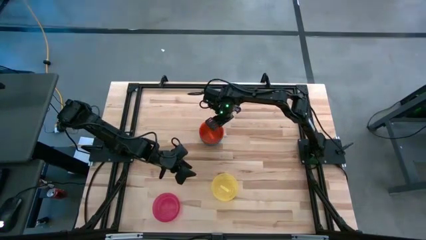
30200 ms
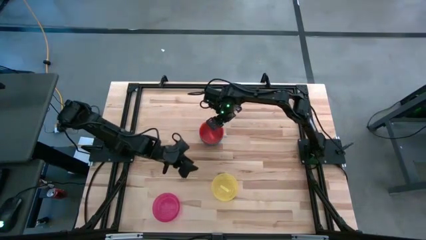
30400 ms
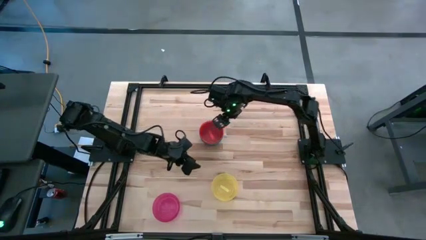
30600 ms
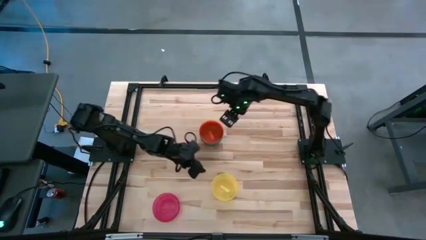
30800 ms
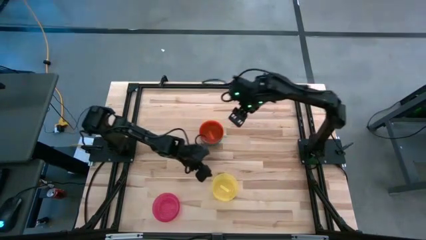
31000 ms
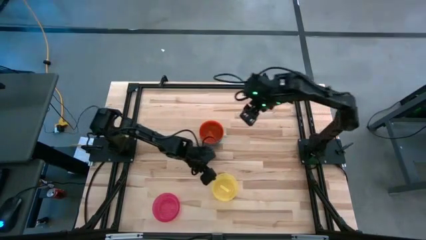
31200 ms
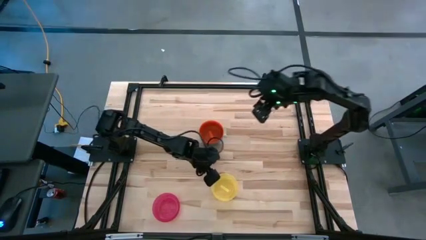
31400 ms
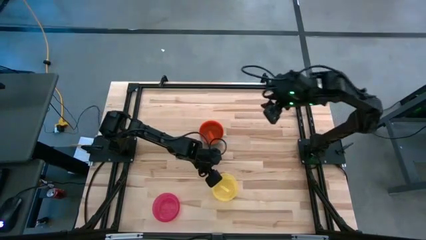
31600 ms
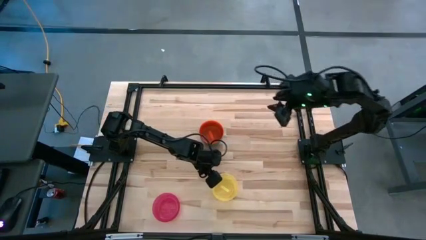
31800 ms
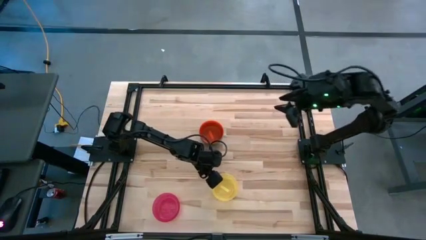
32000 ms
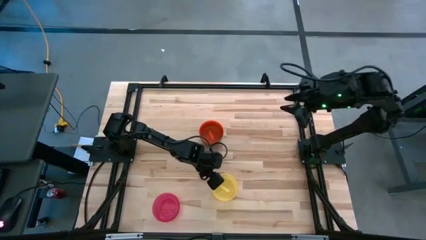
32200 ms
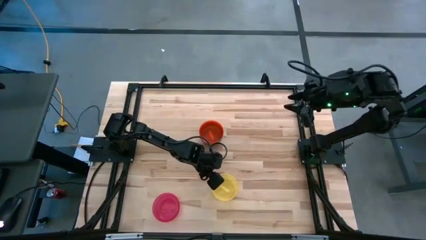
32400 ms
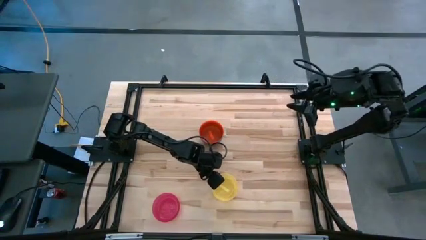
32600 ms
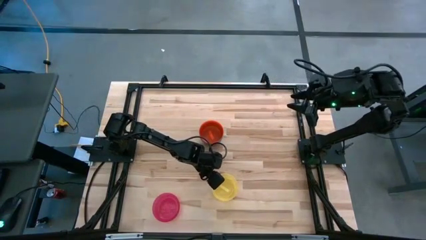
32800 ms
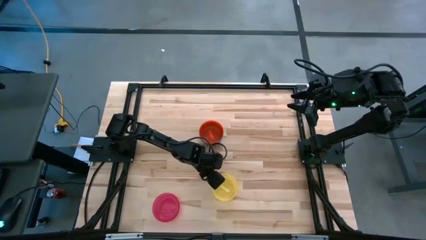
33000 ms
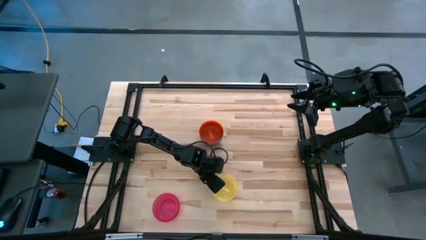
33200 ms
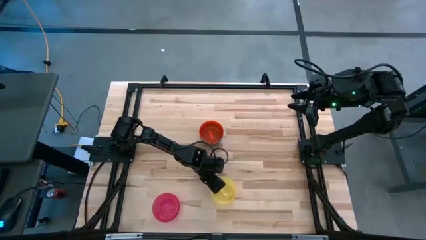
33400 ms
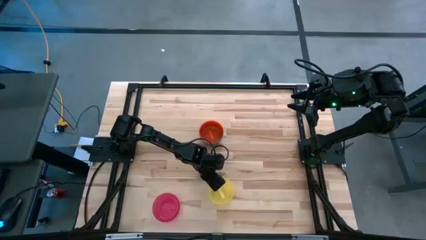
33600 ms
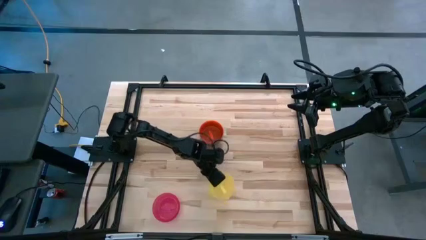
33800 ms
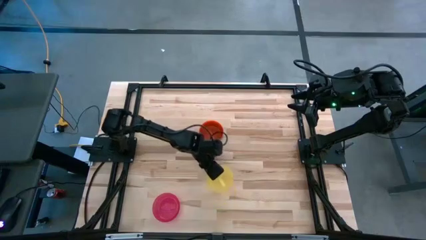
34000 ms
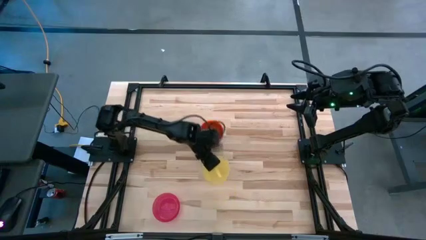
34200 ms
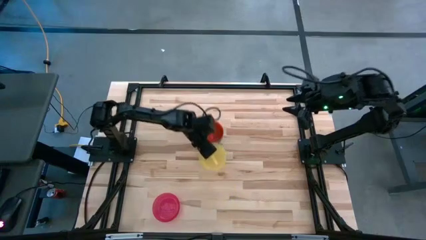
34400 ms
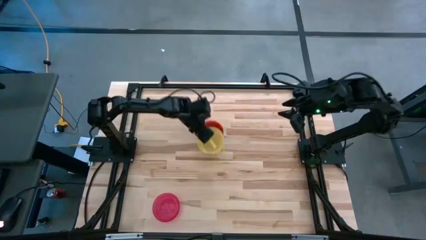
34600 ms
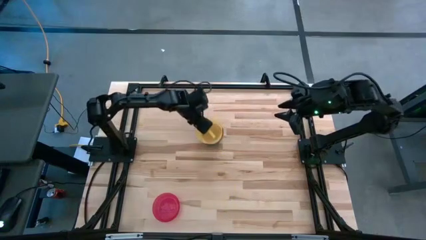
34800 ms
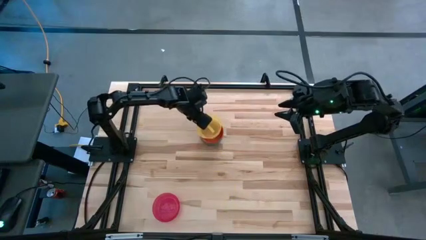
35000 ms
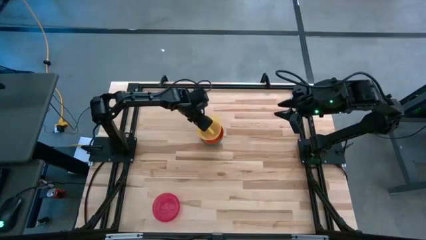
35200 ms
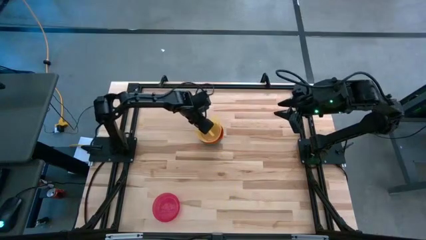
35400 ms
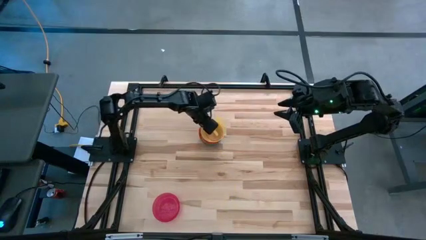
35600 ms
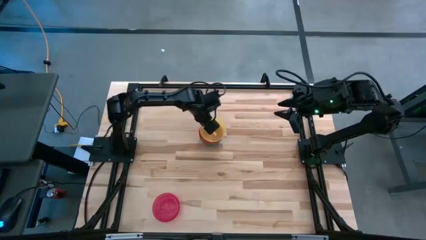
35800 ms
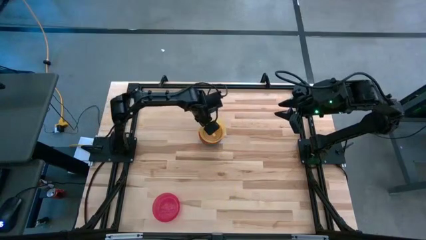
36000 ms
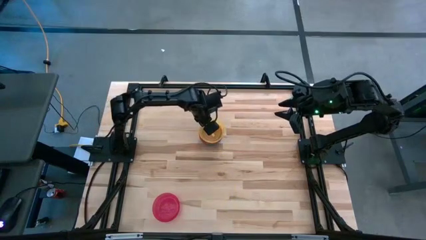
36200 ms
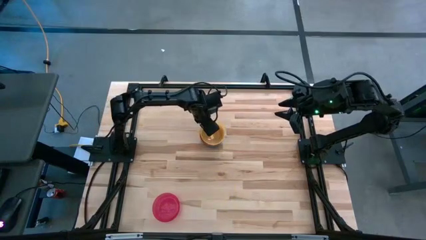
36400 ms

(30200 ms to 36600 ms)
Task: Nest bowls inside each other
Stack the yellow bowl on the orange bowl

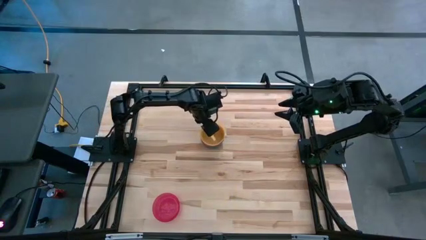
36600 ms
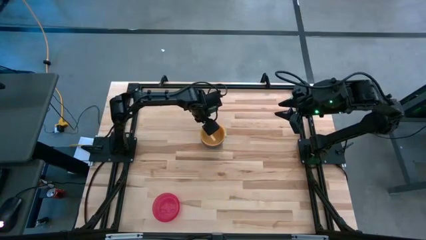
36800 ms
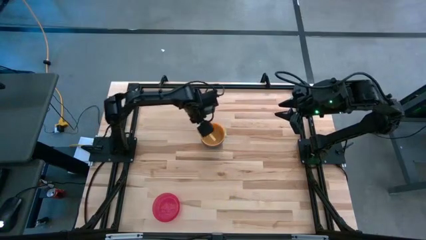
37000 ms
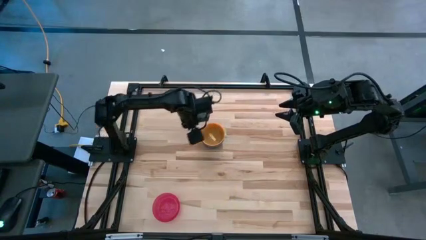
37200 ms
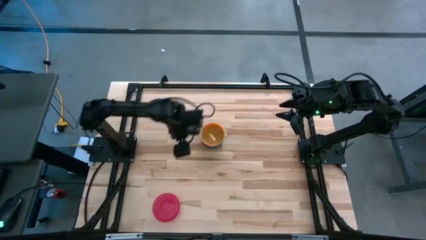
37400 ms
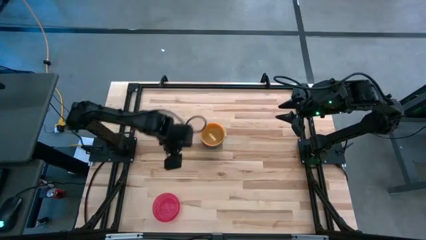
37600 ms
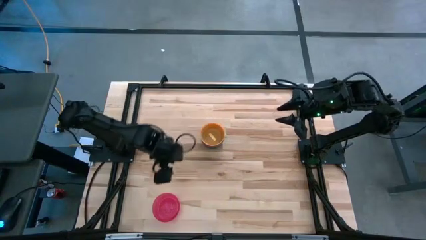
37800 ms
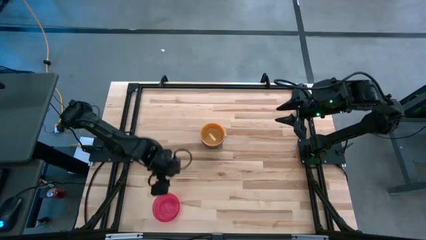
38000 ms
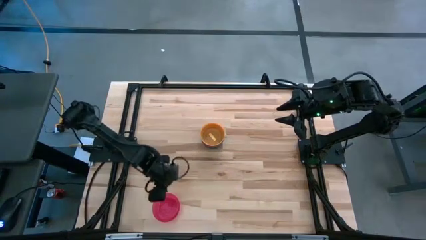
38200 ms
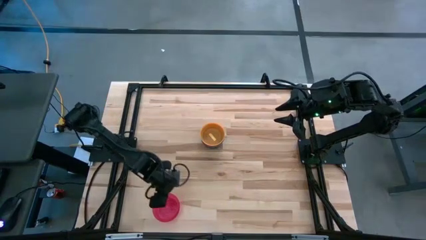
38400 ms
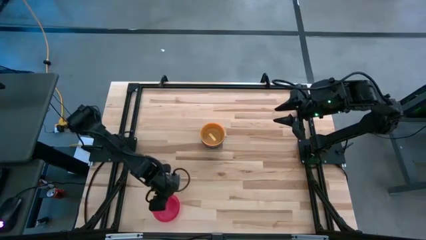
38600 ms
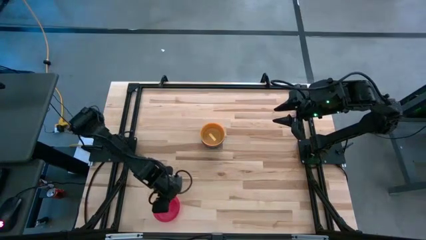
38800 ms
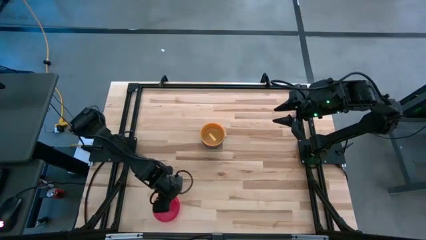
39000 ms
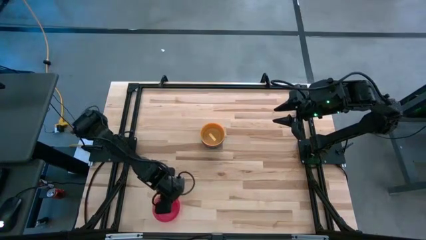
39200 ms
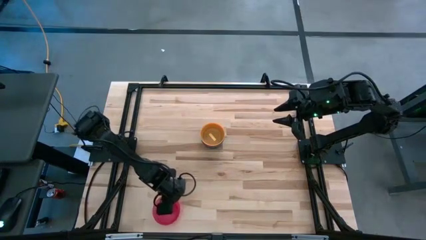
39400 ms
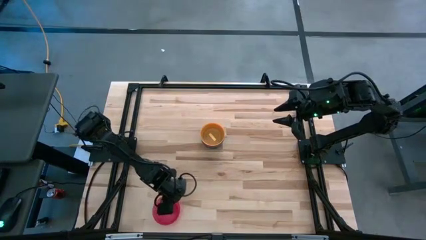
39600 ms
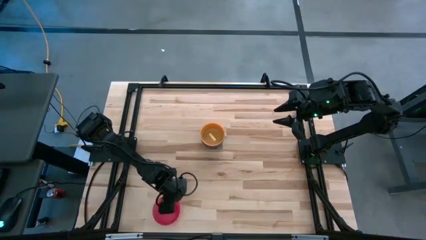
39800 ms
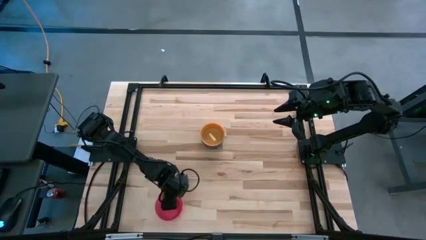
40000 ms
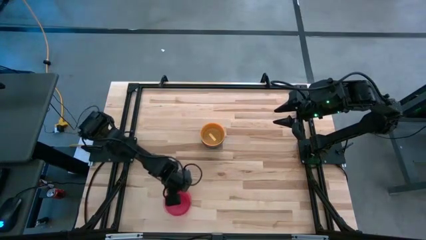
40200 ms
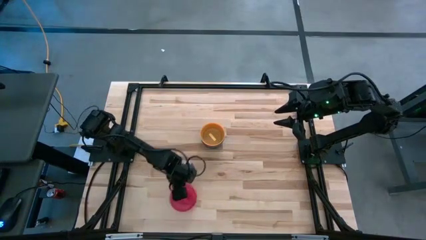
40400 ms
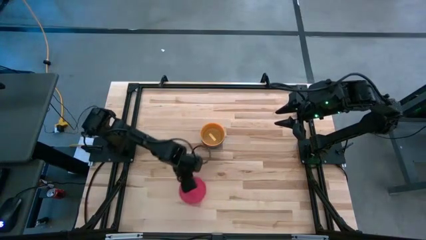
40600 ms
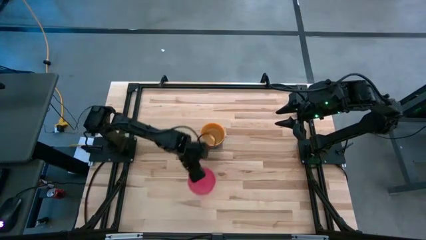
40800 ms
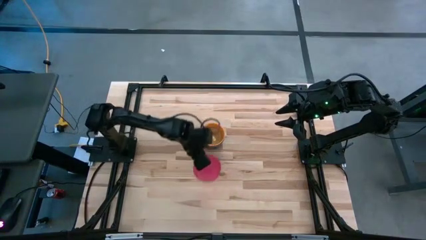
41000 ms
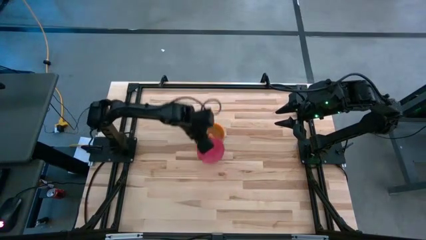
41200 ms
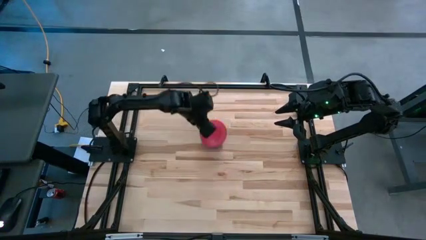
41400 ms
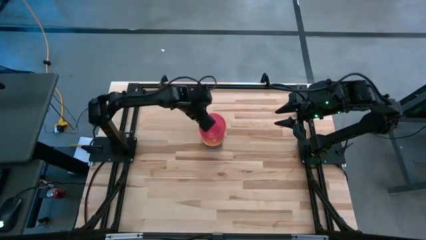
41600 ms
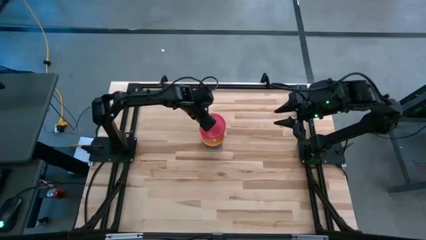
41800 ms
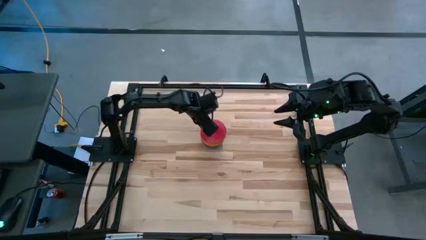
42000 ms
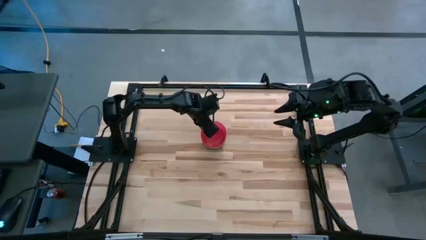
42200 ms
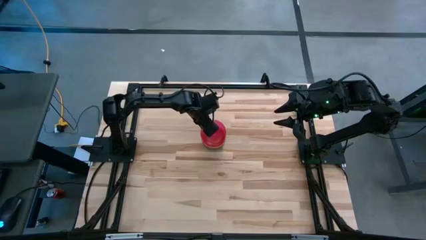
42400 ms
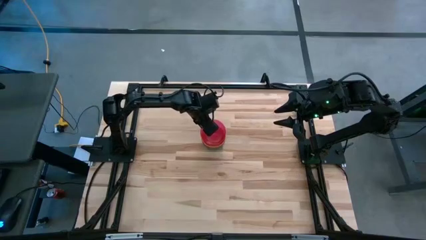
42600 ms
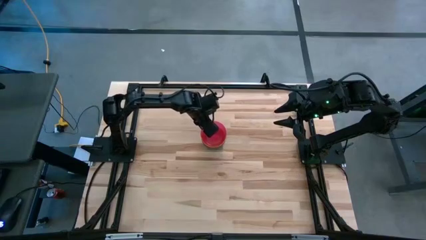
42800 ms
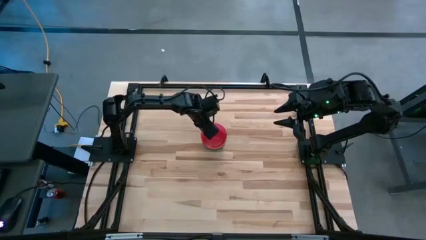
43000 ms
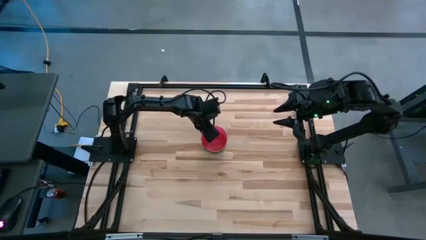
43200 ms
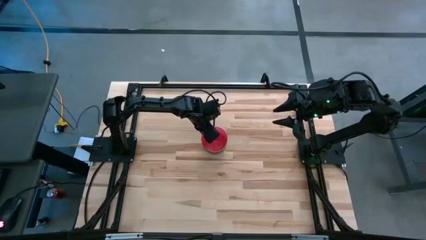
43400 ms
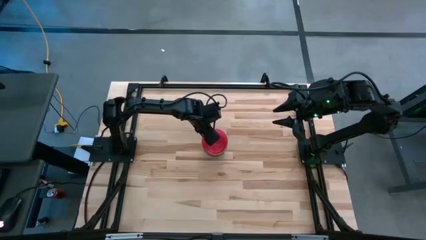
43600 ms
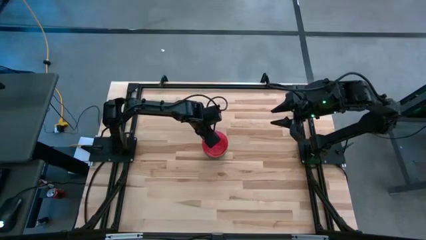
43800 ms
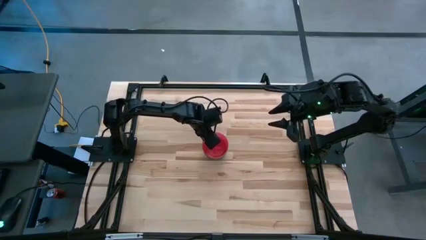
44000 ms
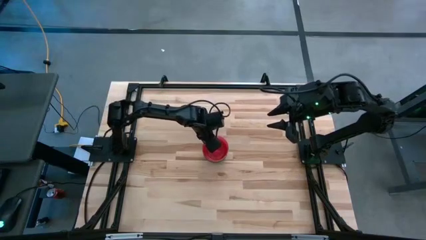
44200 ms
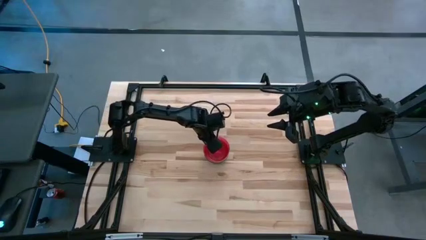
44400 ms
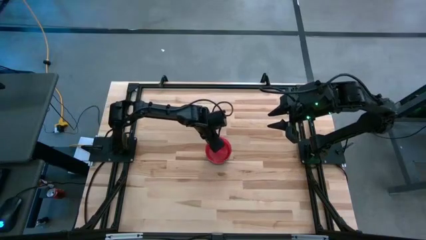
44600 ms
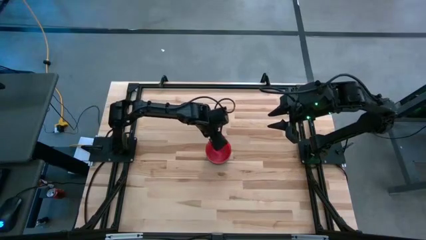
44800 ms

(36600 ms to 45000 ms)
Stack the red bowl on the yellow bowl
